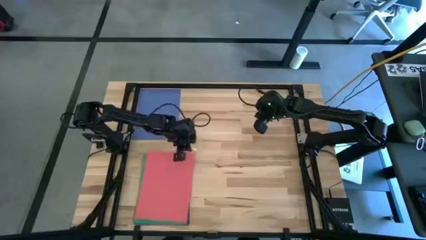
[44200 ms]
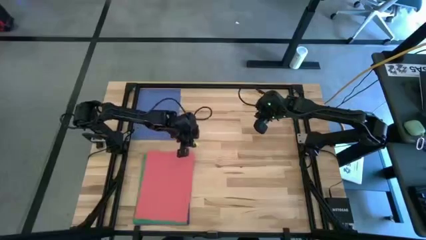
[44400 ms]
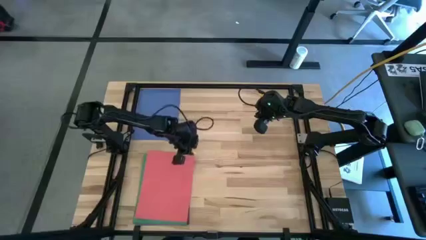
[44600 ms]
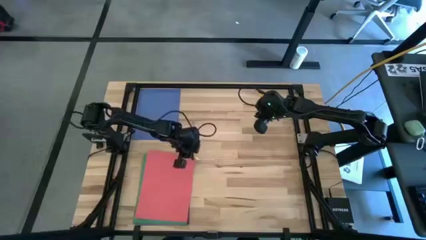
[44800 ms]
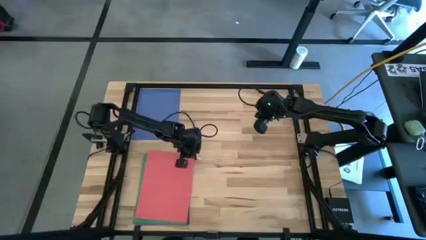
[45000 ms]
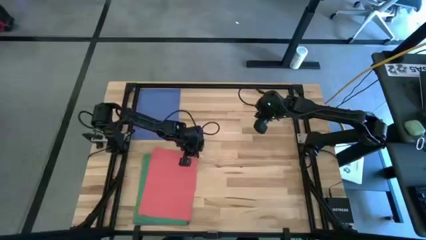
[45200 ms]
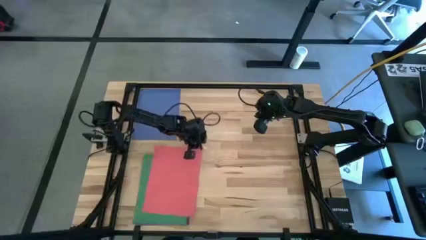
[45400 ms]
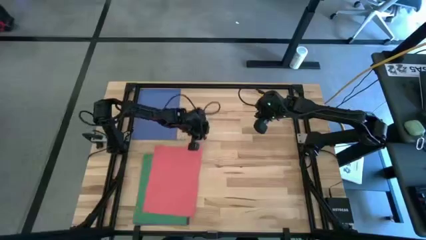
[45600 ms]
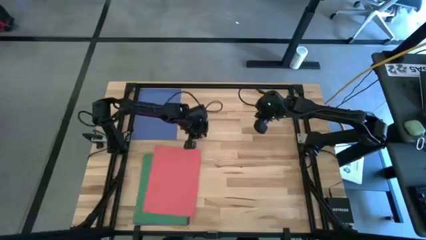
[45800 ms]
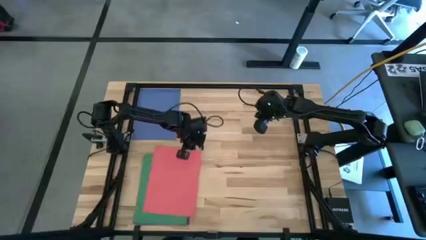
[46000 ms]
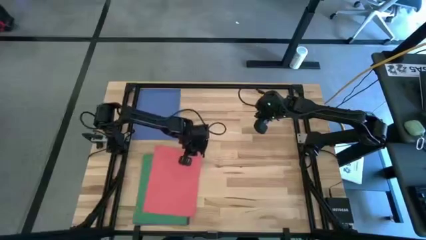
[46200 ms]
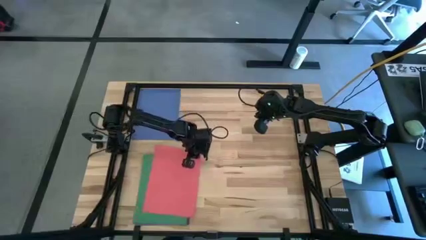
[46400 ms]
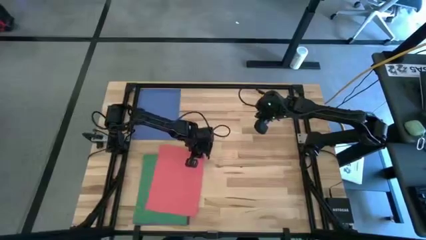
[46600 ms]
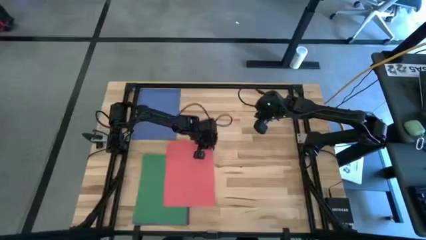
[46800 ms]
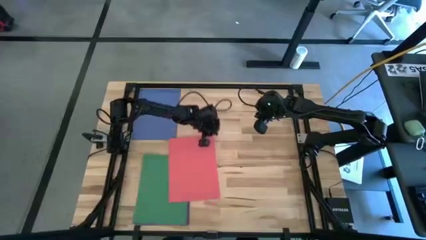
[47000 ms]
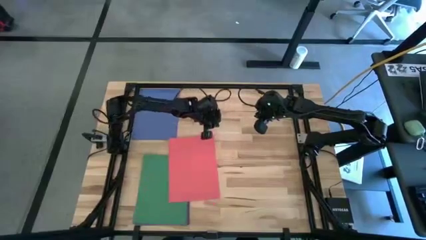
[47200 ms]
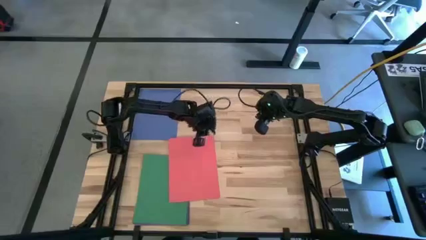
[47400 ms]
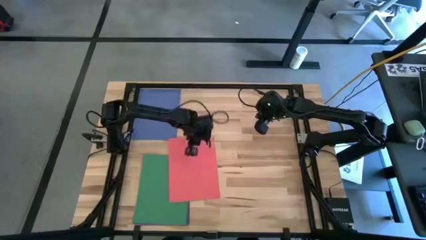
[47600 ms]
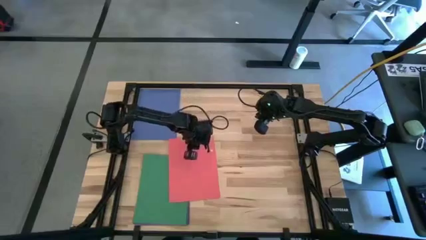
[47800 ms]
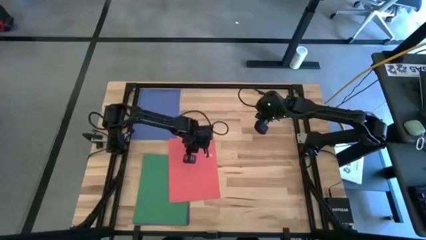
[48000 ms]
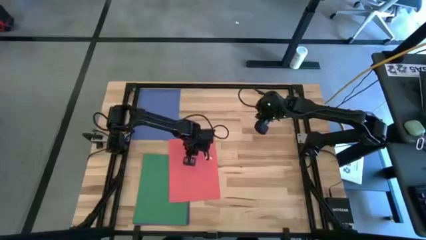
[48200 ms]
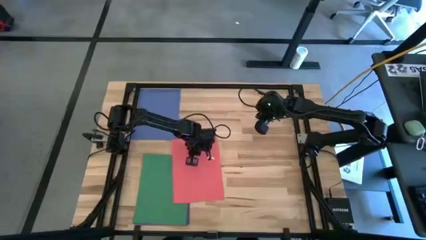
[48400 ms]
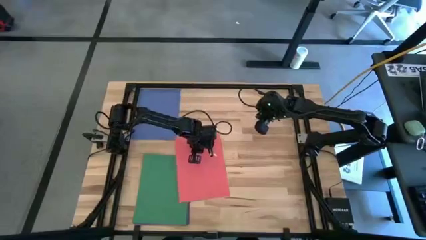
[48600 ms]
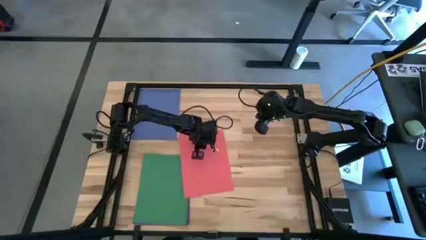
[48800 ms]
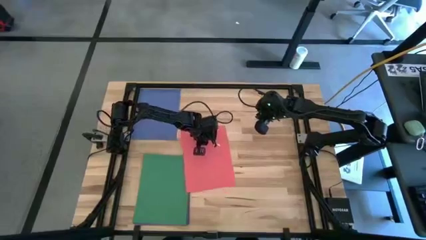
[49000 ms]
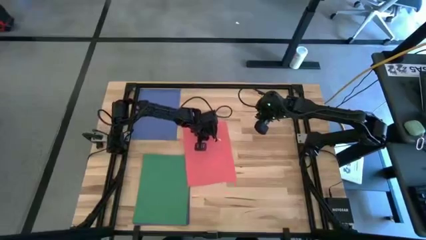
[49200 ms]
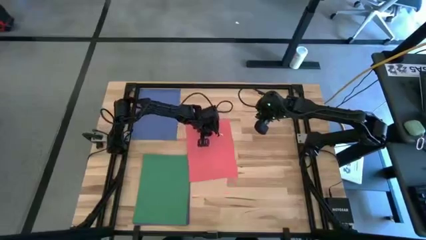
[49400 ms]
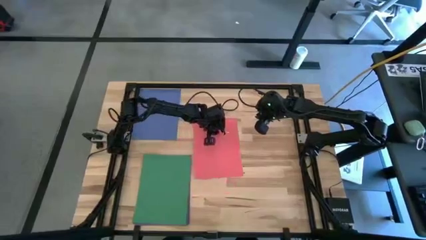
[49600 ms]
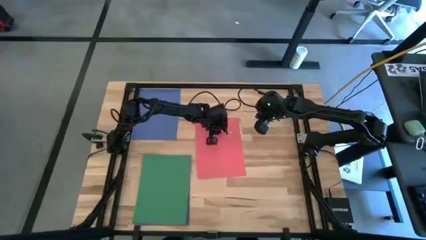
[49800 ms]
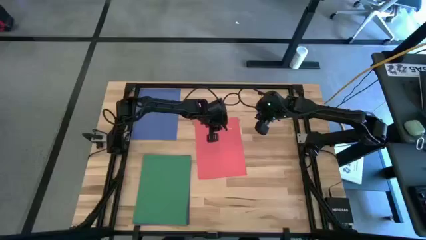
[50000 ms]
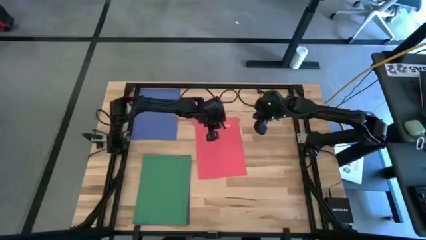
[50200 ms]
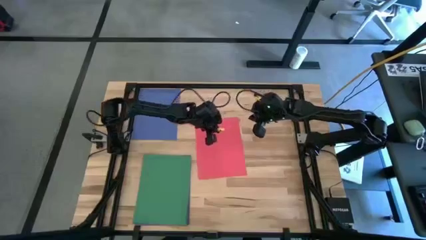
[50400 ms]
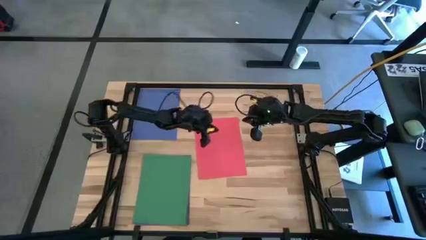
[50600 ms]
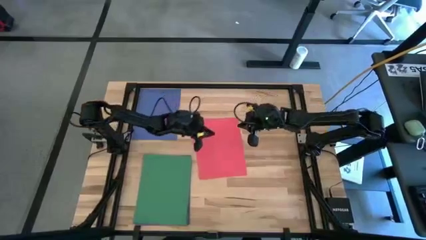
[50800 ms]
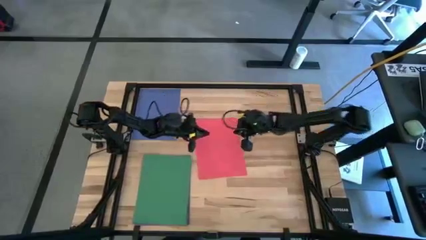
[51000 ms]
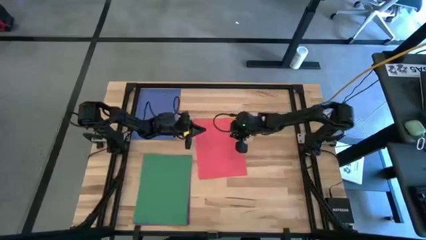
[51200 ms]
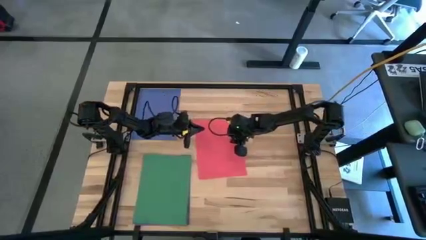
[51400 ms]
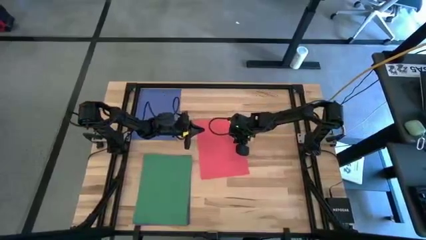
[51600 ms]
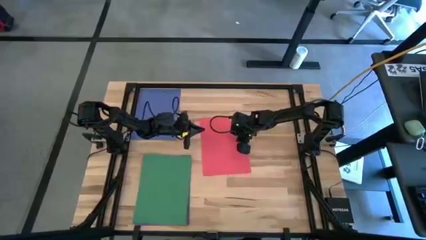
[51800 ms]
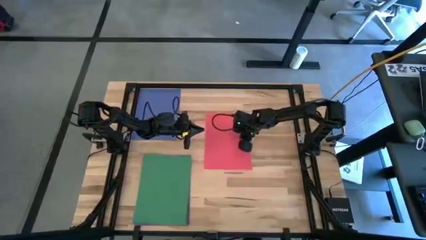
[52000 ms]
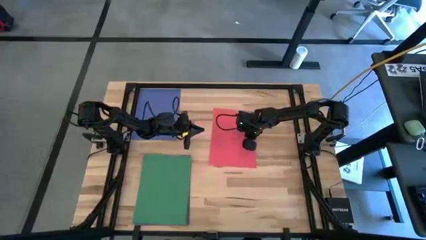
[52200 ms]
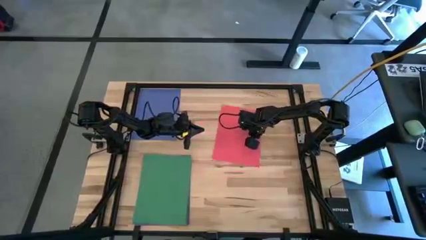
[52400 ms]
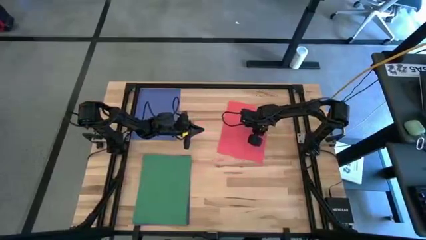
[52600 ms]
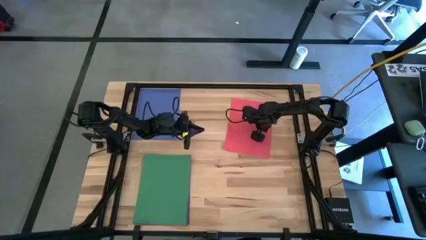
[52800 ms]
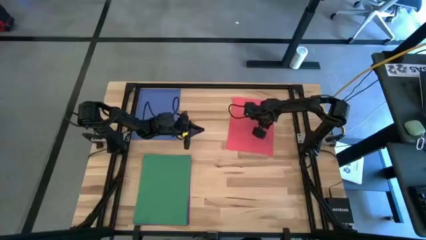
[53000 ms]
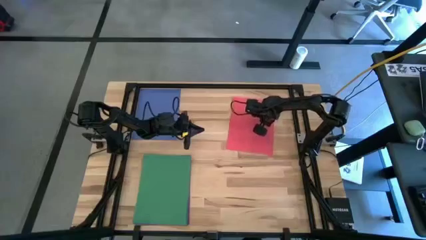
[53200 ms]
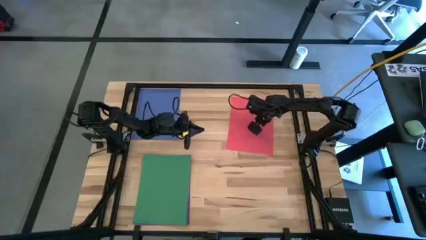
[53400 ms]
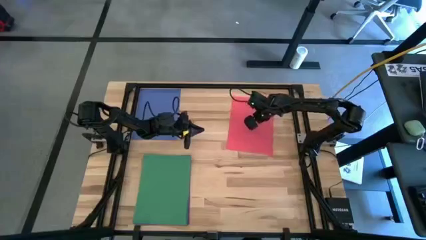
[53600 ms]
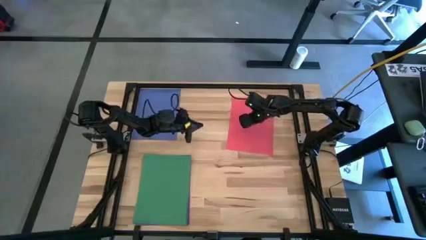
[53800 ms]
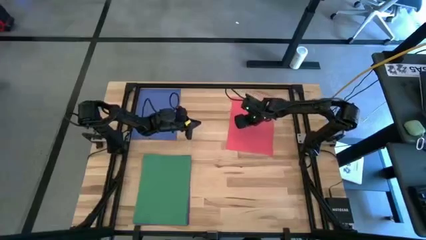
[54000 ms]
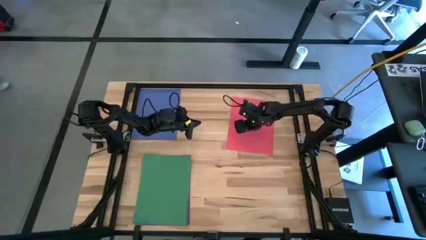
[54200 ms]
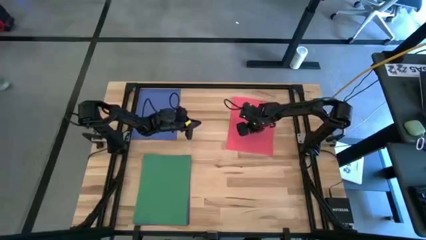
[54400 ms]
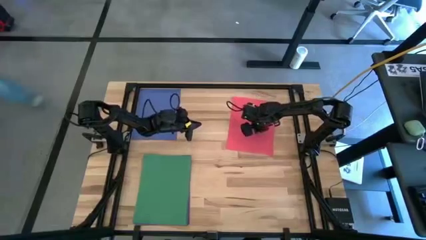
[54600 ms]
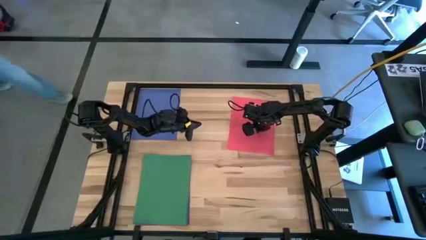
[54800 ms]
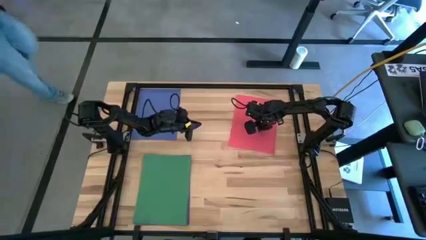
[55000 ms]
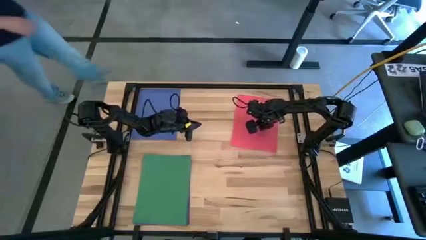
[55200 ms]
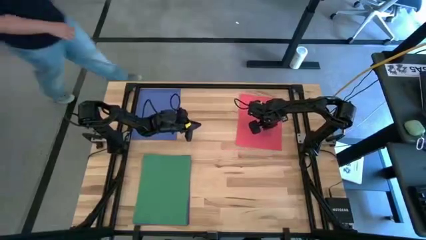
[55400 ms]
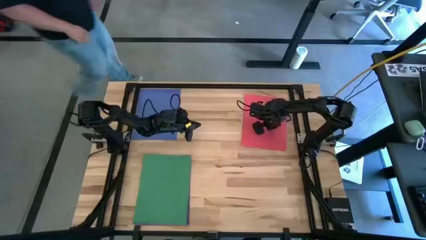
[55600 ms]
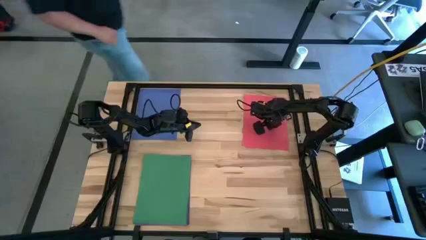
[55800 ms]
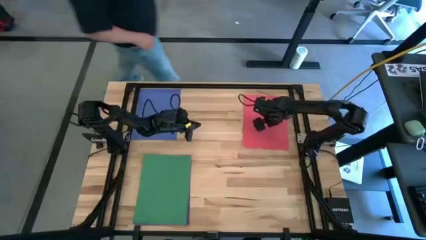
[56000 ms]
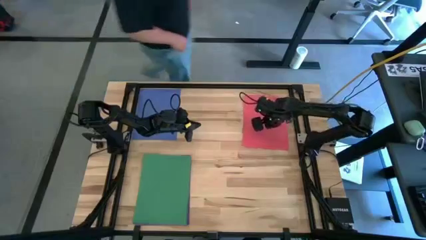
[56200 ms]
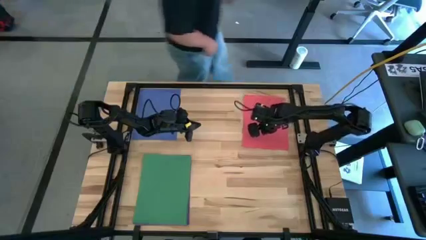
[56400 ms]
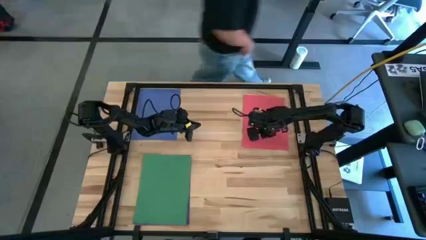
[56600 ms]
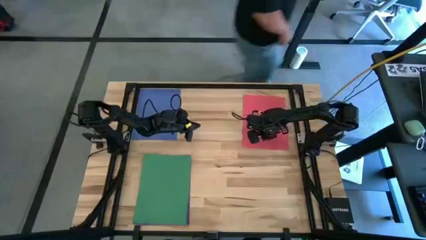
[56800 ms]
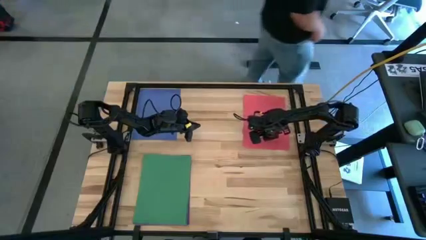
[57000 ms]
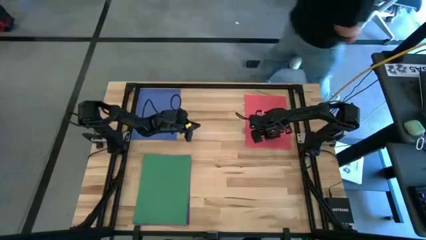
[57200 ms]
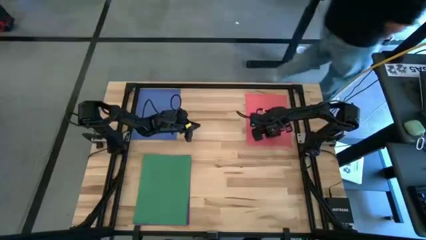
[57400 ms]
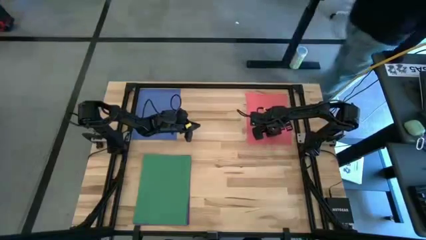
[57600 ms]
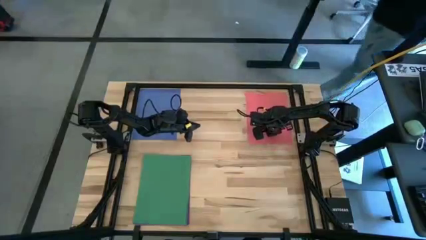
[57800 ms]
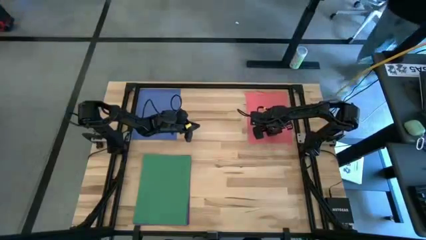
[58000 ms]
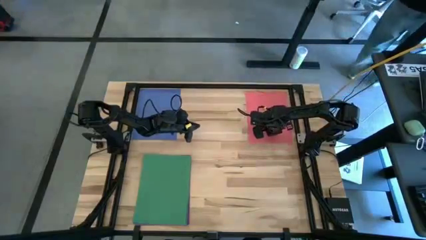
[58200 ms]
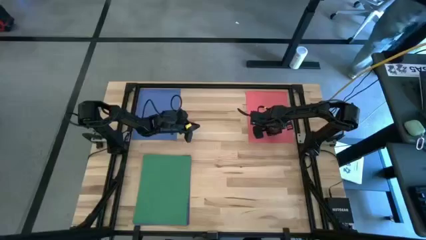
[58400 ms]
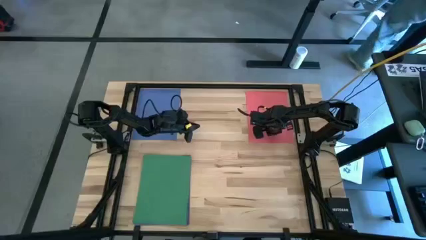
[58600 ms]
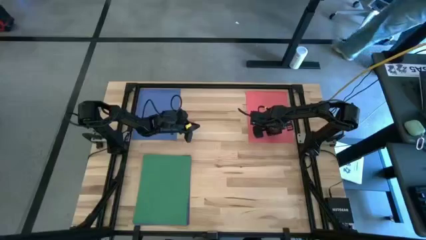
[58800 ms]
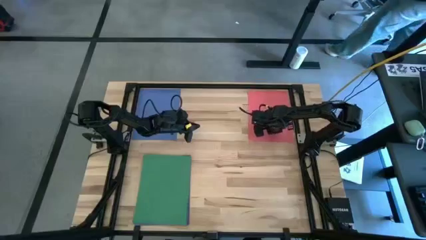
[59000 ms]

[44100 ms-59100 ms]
Task: Organize paper
Move the red paper to the top right of the table

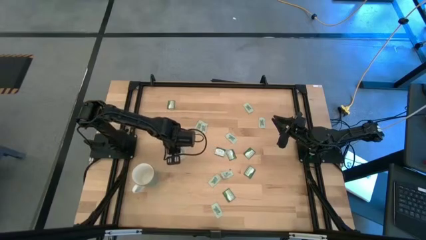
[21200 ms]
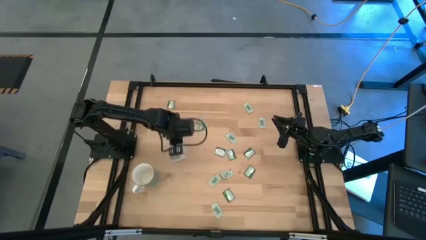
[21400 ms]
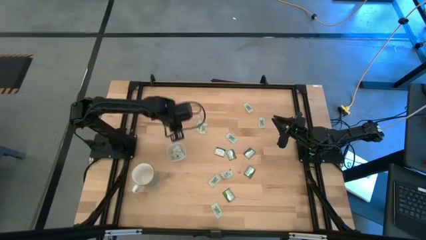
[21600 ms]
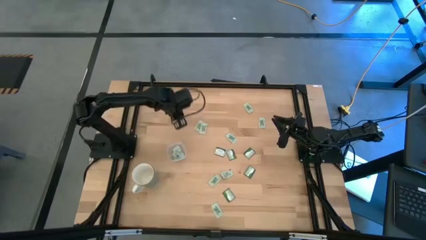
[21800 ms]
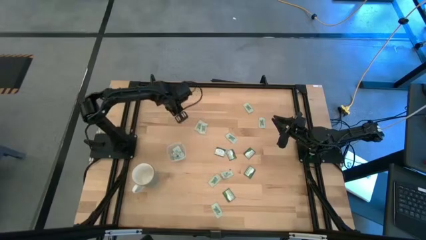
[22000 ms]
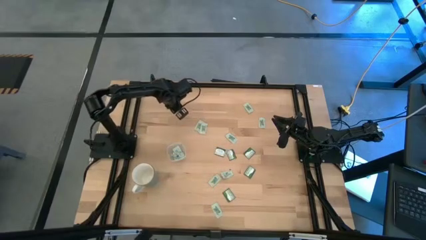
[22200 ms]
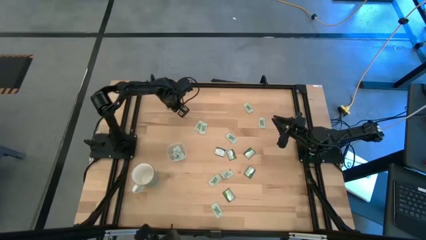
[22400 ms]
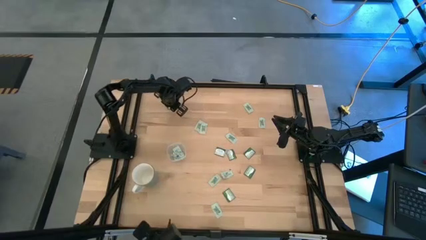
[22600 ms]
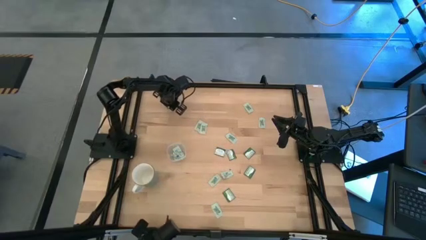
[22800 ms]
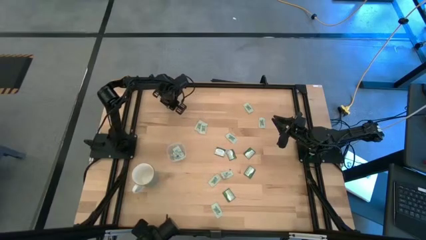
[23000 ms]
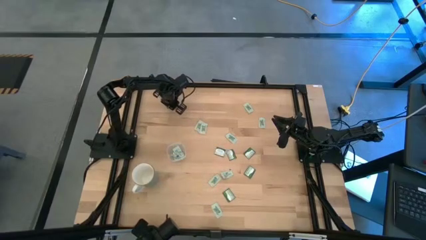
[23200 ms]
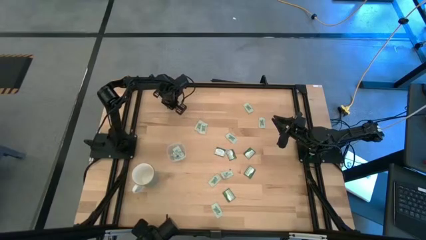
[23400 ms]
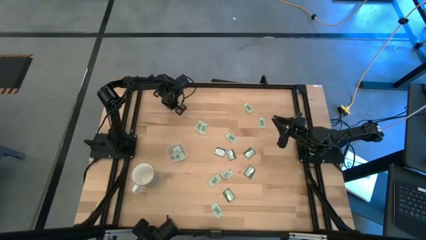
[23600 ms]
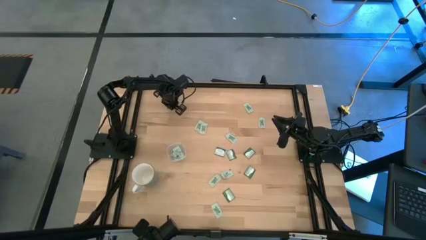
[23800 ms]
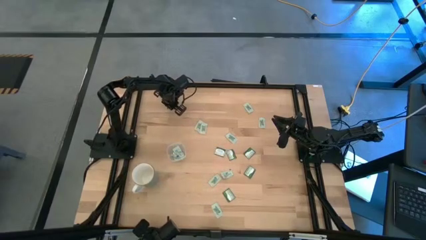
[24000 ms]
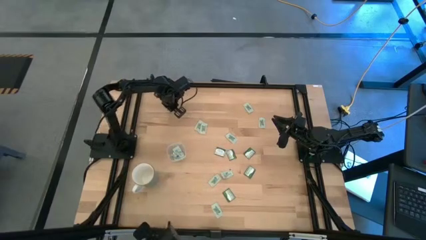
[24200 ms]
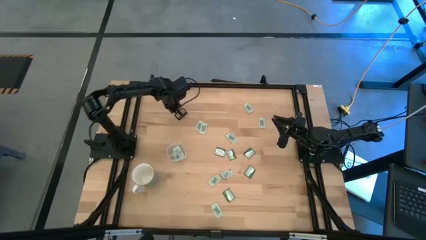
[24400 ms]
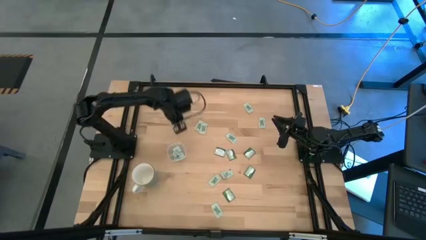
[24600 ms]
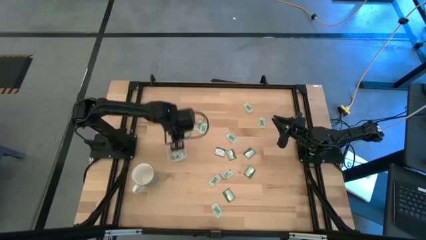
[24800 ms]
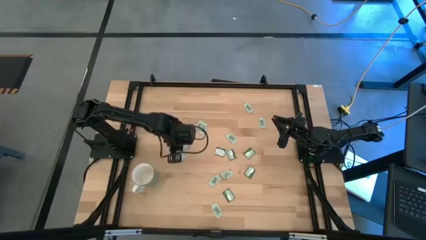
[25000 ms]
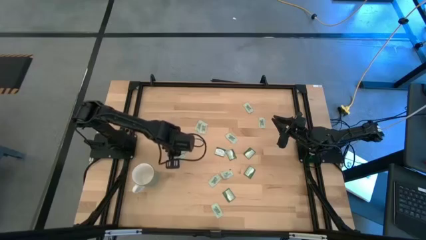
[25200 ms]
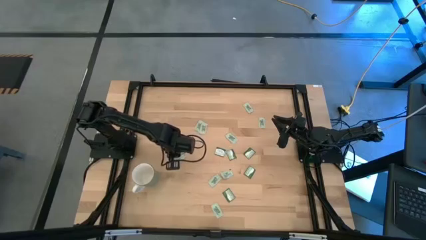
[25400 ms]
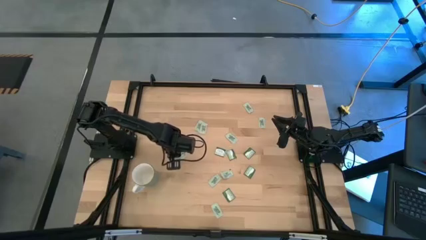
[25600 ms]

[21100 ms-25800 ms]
Task: Pick and place Stevia / Truvia into bins
Put the dark green stevia packet into the transparent container
